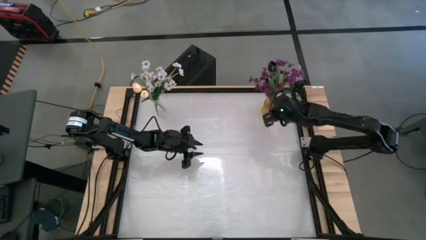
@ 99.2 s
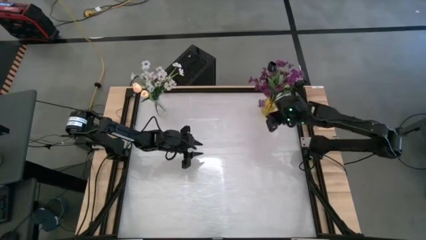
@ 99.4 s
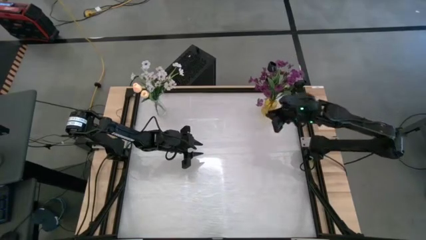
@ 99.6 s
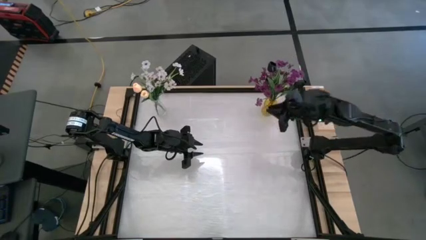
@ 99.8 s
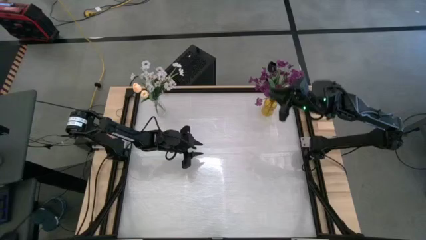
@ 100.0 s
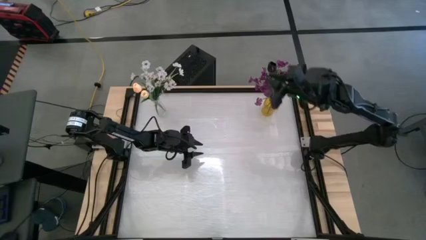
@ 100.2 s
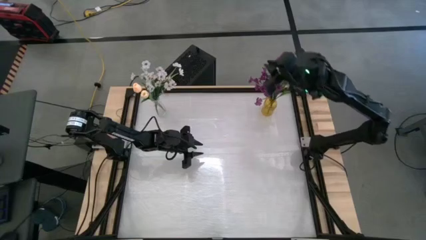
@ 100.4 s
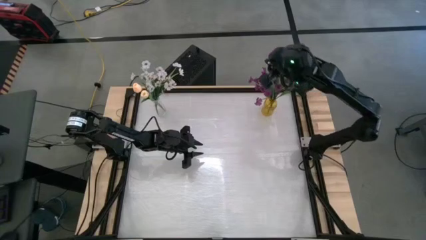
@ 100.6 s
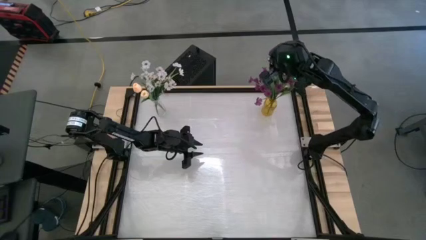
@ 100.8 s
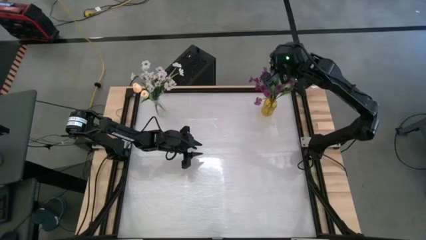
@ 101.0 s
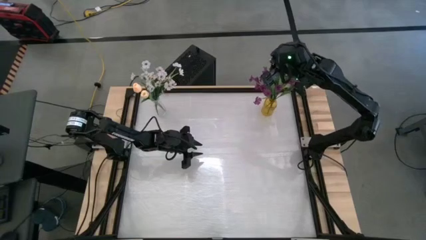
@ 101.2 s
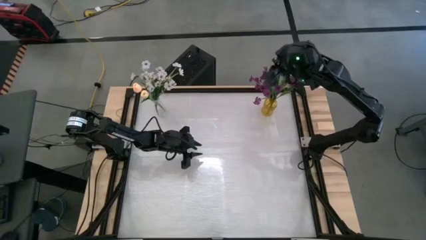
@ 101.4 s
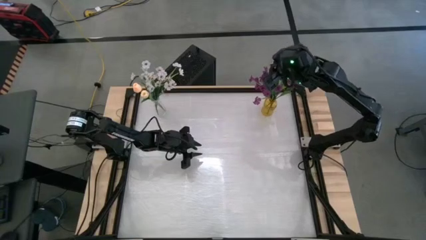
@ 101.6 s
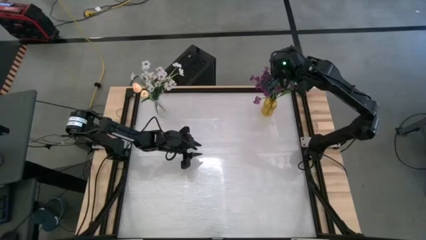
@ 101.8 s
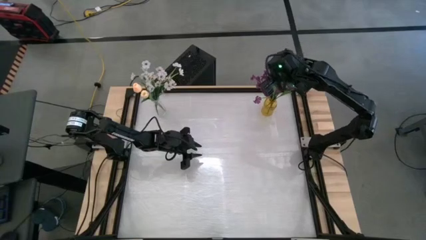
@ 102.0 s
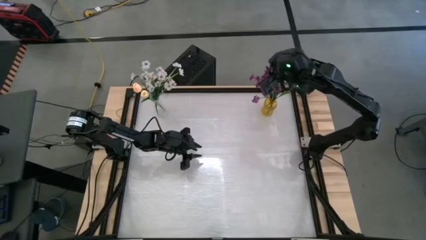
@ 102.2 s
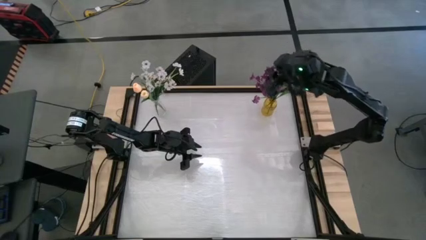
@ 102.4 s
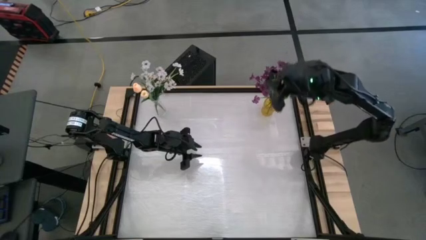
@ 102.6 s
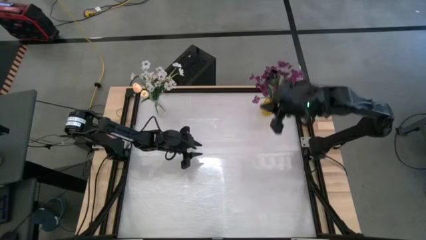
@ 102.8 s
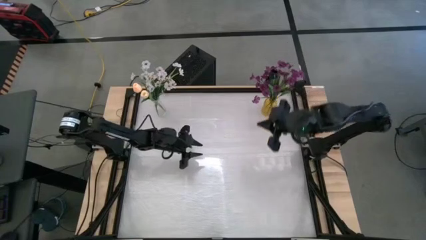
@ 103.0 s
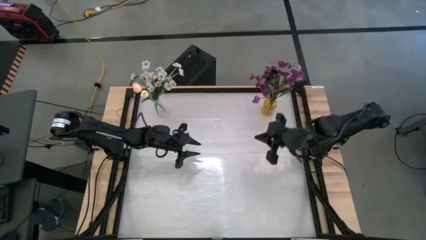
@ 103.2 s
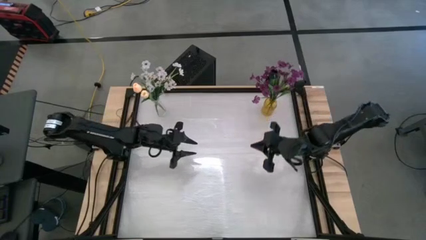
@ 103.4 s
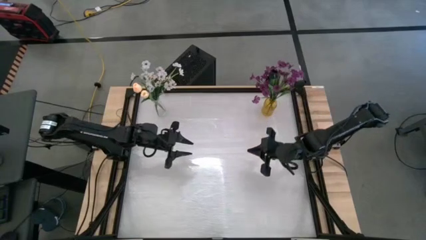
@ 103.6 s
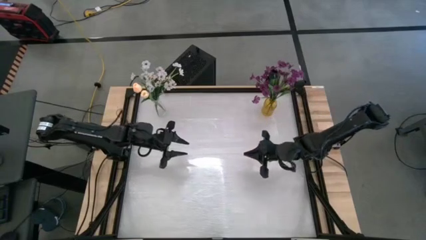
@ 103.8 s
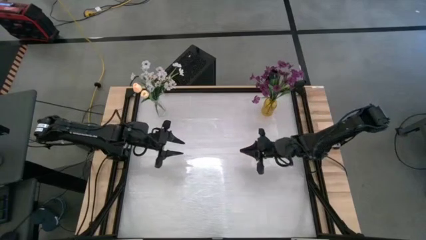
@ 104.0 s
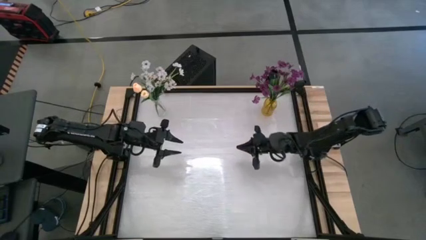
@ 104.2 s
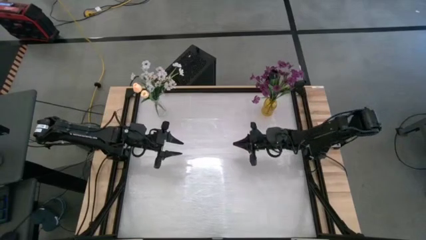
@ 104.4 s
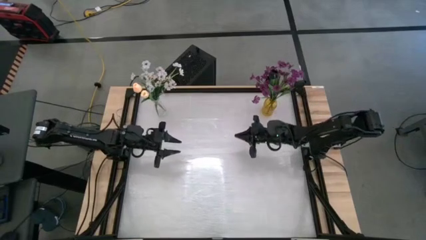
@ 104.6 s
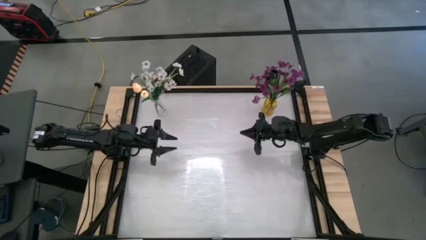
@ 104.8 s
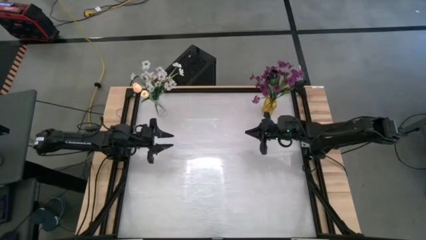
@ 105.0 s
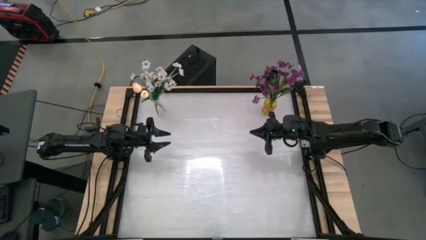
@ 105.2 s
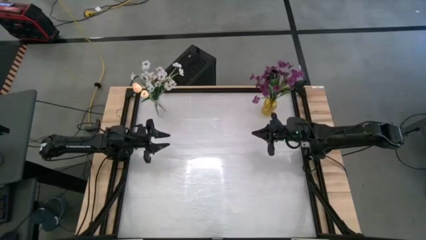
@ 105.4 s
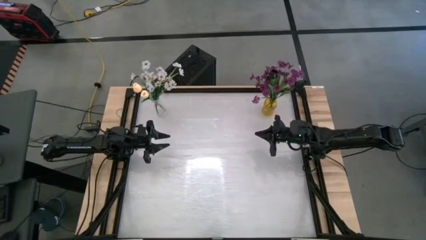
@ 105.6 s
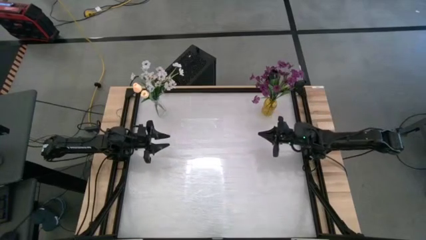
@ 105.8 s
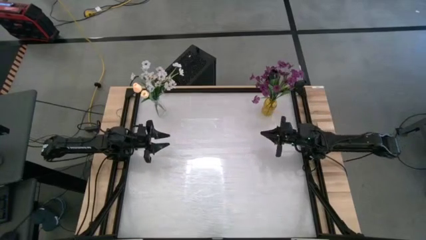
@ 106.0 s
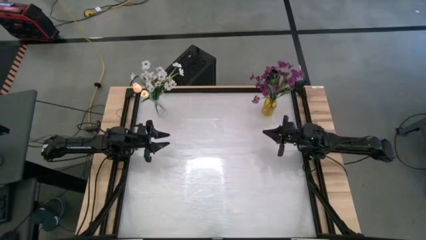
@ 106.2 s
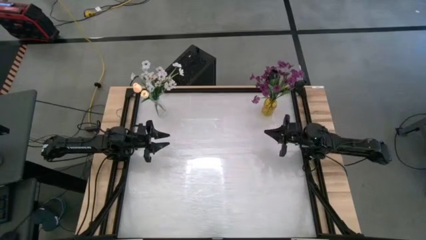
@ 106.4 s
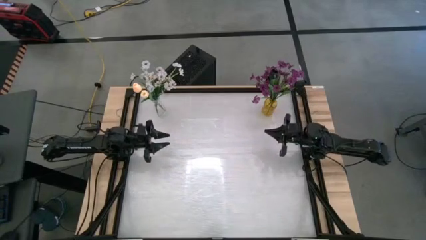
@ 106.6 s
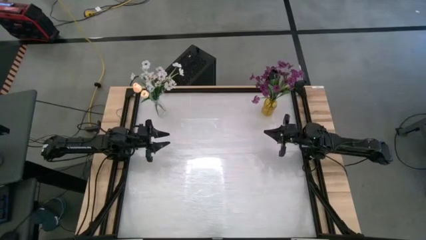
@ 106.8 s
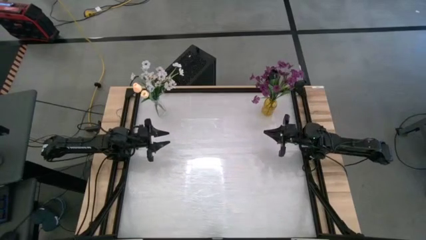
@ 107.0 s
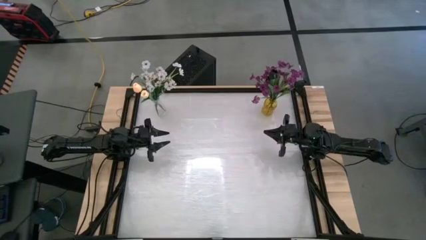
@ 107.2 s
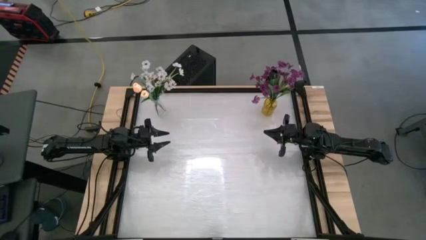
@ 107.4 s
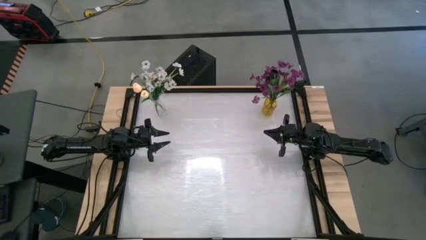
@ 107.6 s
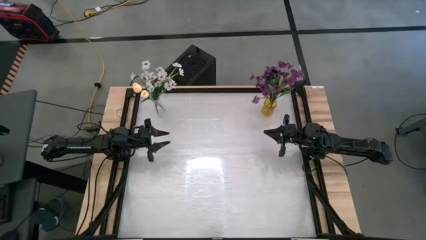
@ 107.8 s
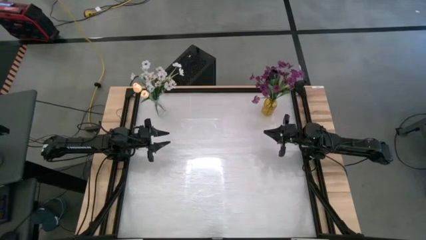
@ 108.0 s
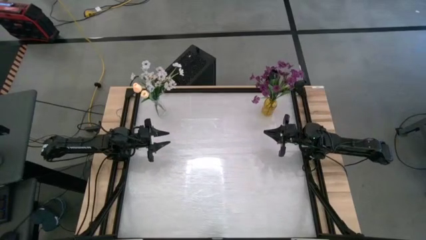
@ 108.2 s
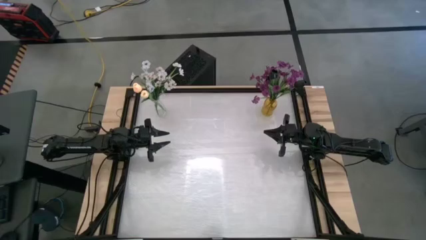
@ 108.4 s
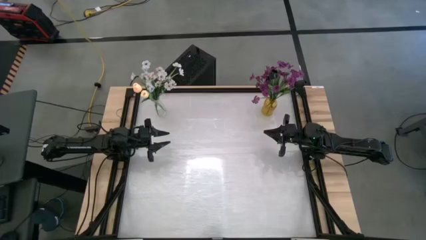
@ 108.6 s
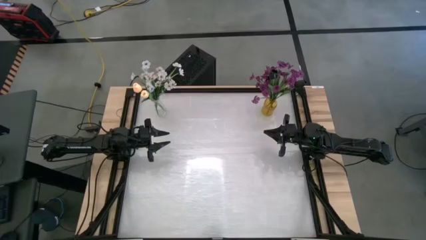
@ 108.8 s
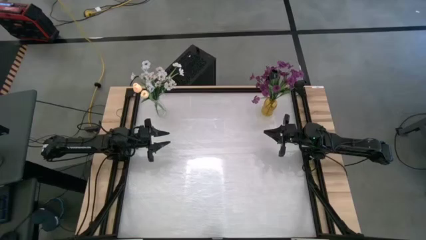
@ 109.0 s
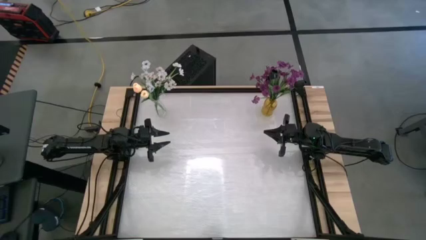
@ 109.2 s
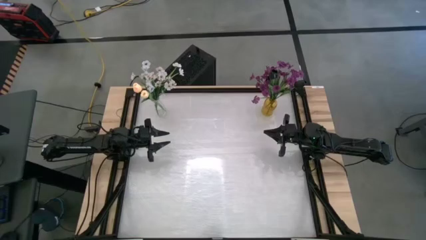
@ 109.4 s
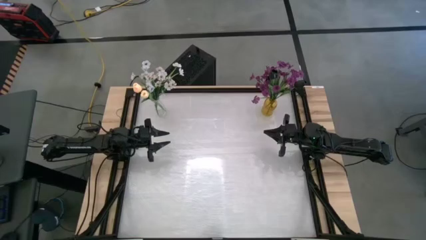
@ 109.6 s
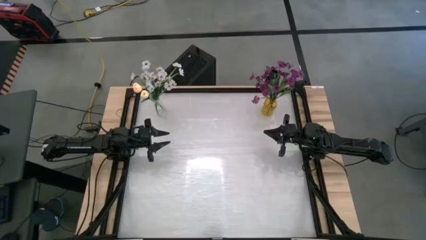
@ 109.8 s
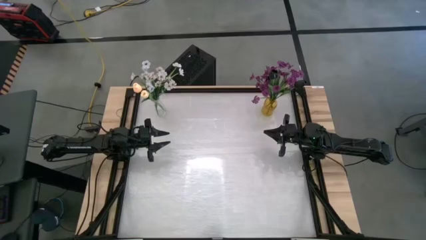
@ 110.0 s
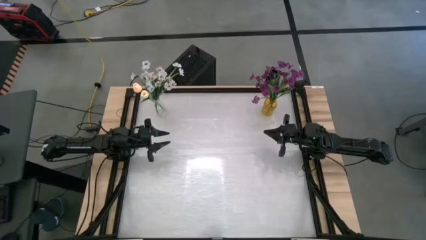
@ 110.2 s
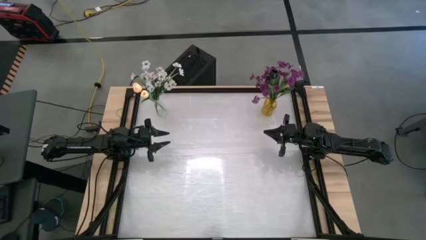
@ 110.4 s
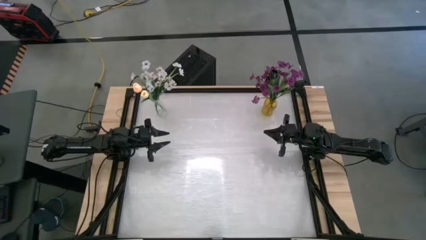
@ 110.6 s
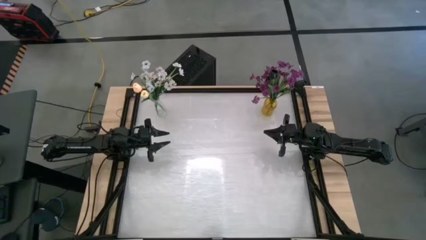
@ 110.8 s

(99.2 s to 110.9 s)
Task: Sort flowers into vase by color
Return to Home Position

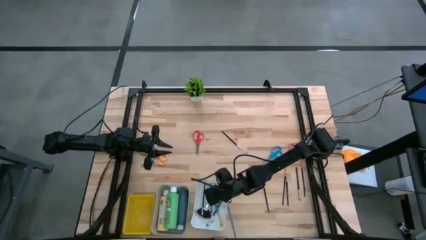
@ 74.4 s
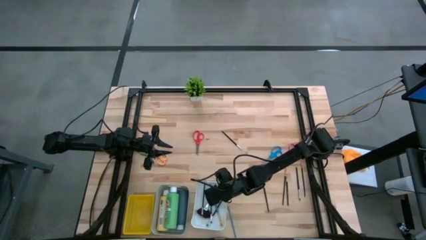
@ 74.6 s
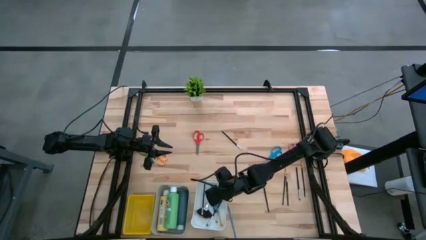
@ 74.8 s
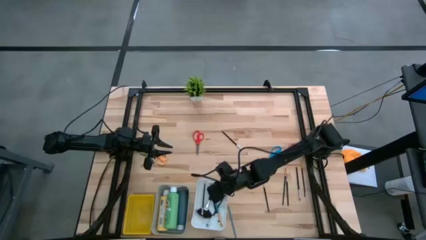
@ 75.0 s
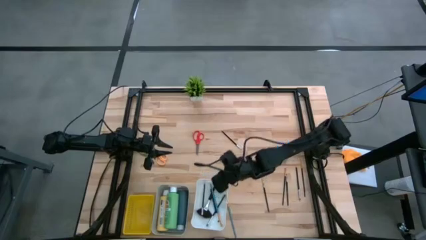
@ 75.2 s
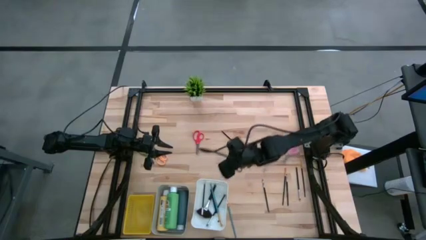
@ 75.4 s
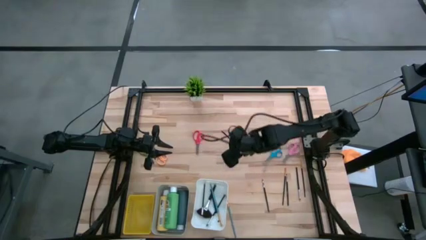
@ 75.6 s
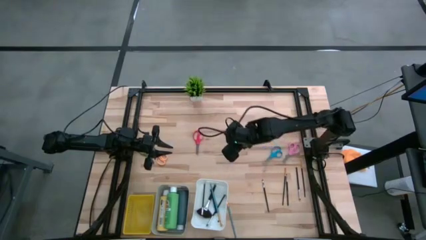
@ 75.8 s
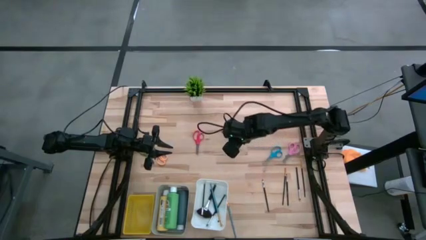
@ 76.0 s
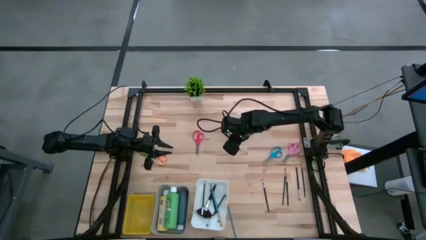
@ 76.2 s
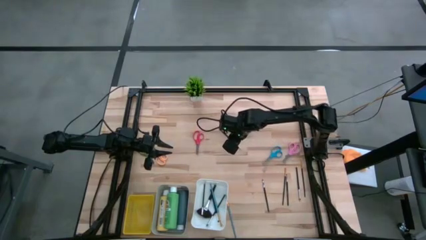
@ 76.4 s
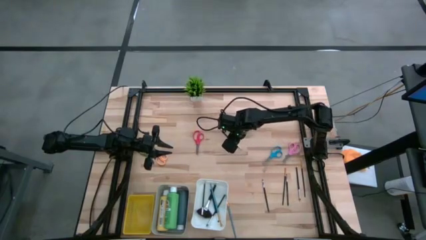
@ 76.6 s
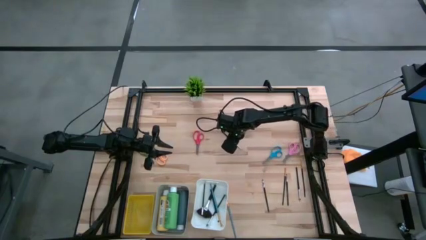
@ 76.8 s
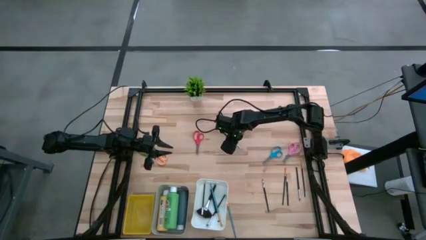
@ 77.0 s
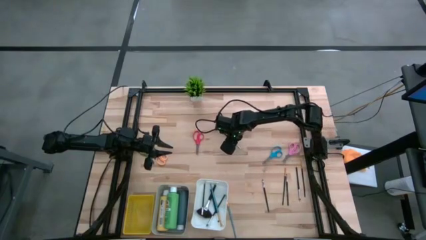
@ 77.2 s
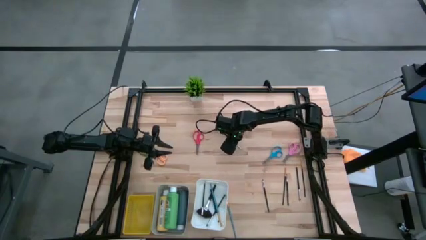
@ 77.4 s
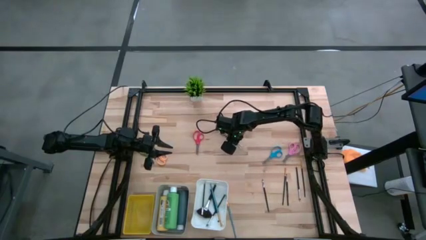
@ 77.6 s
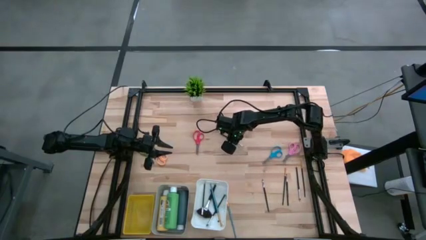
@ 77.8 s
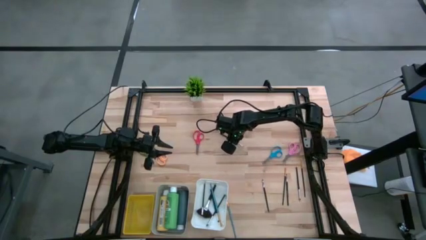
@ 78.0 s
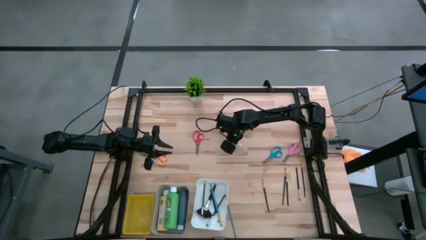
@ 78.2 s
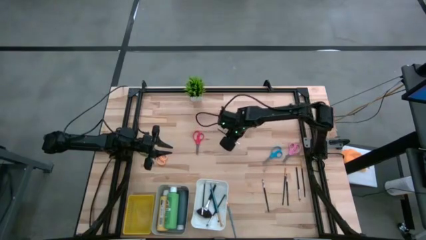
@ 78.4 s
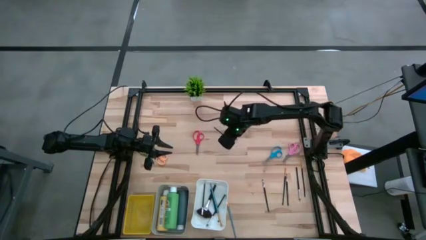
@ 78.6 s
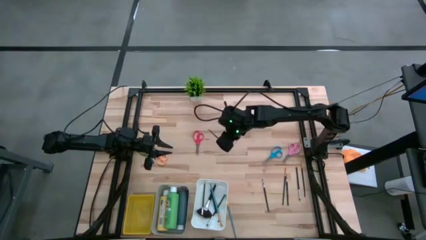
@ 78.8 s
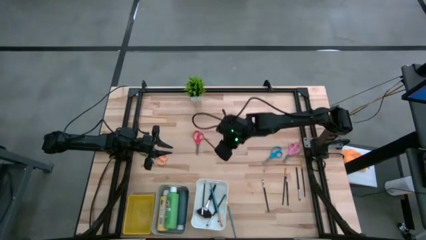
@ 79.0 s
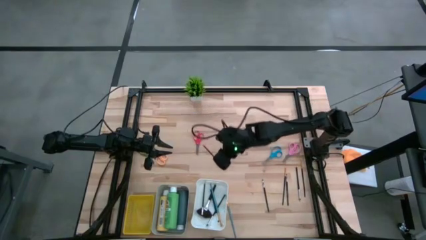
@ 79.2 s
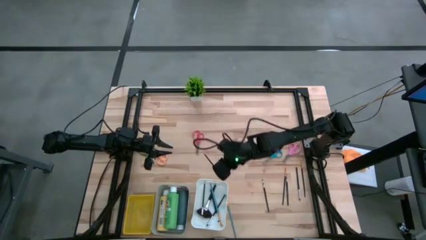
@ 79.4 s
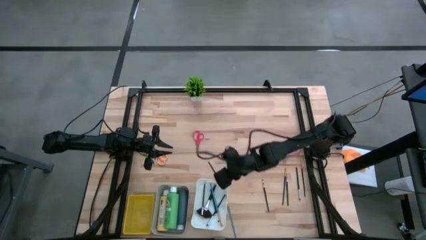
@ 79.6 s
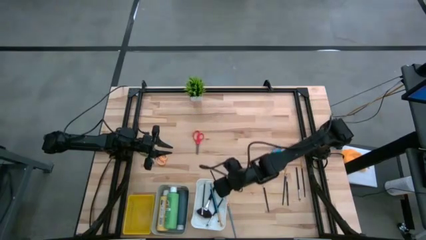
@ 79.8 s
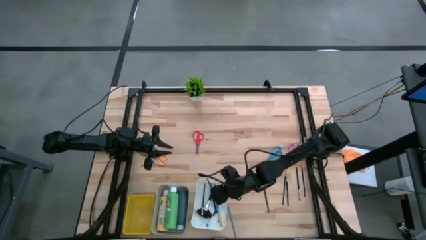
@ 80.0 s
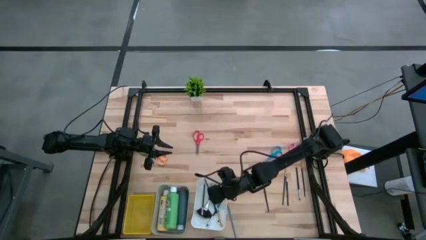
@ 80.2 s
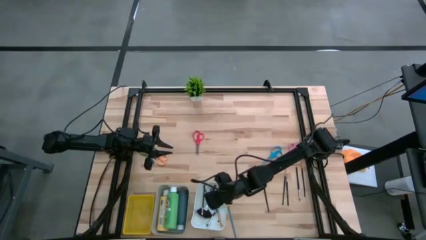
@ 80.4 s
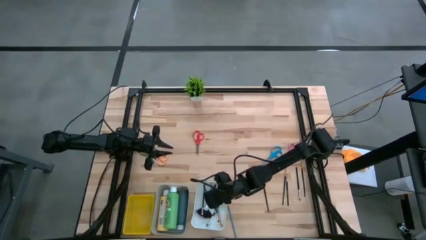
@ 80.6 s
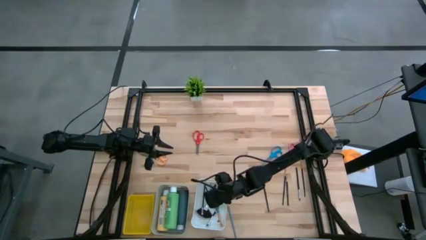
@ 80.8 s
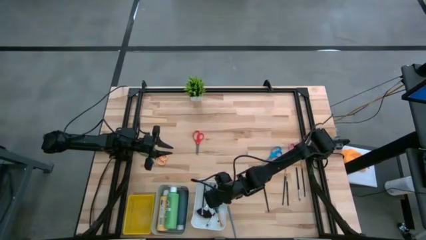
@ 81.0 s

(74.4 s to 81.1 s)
Task: Pick & Place Paint Supplies
Put the black paint brush into the white bin
